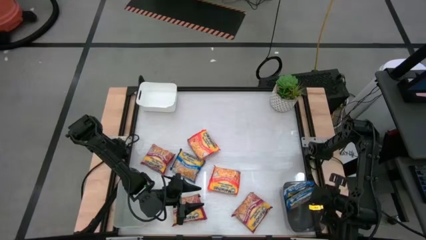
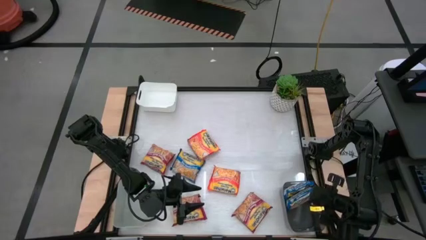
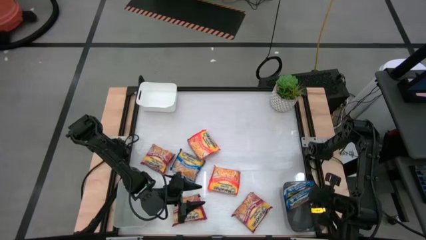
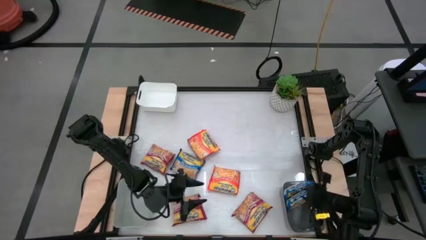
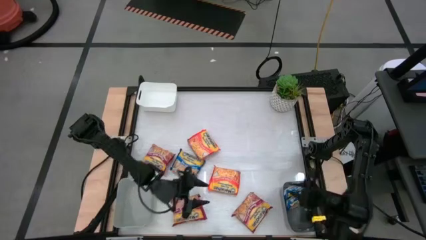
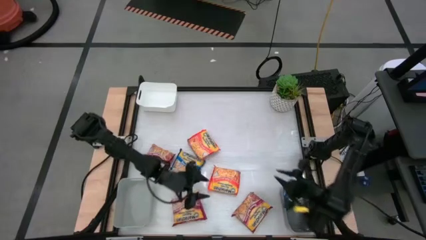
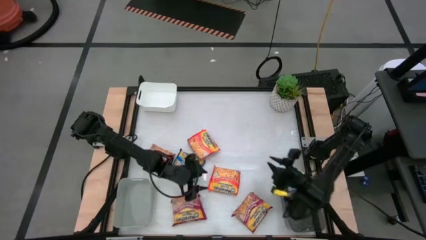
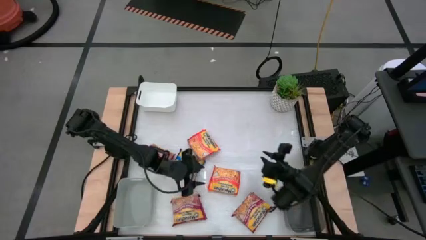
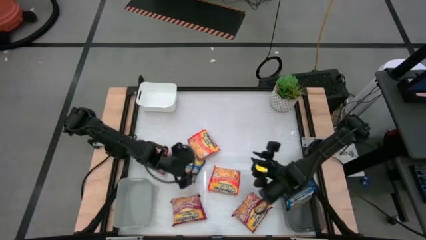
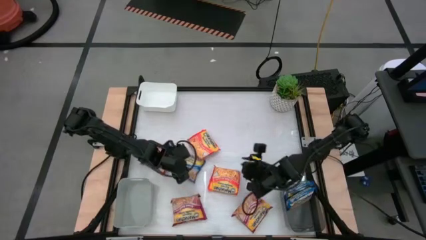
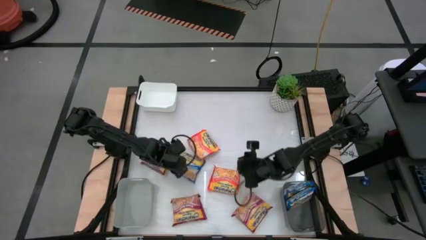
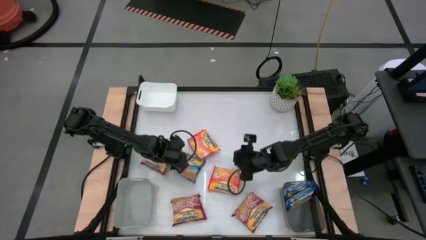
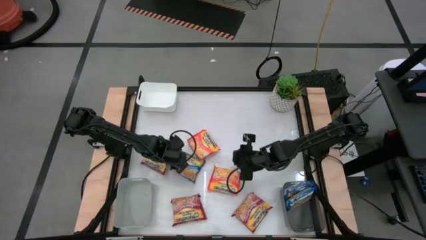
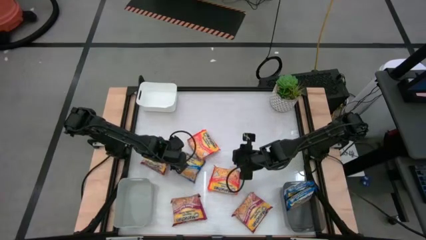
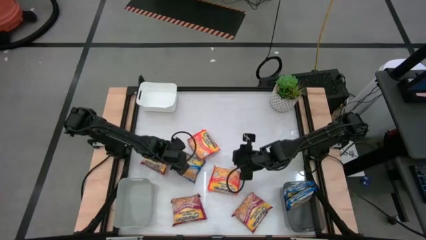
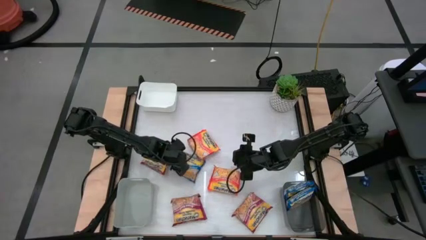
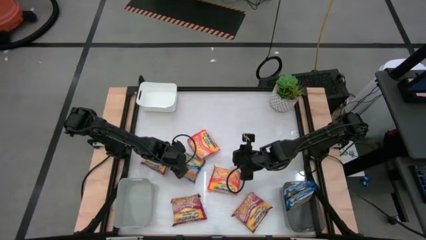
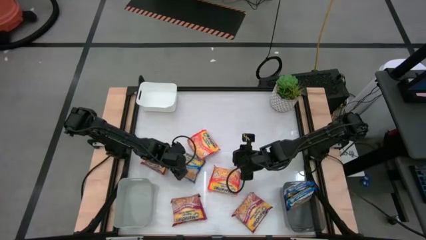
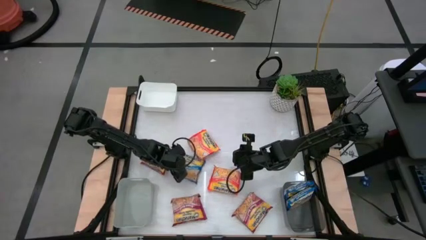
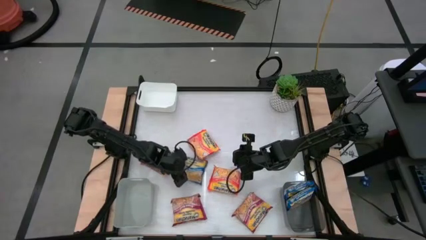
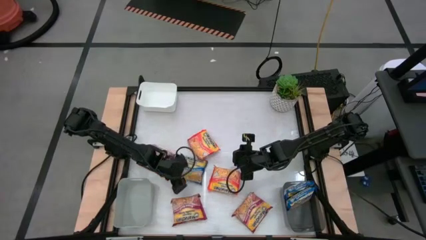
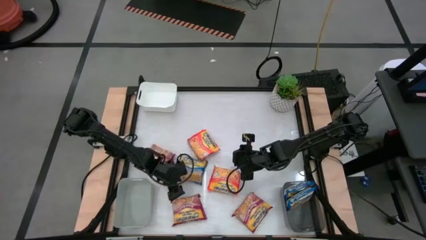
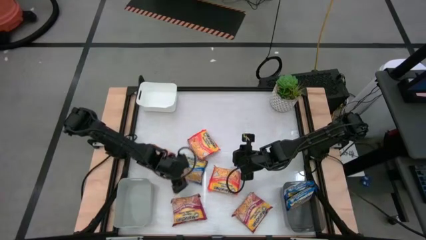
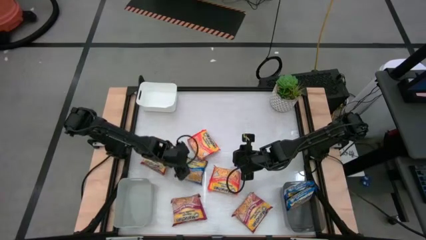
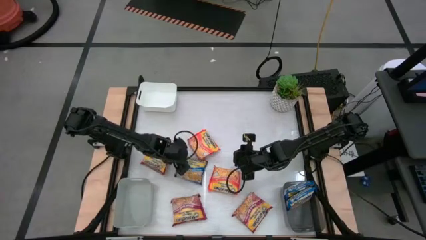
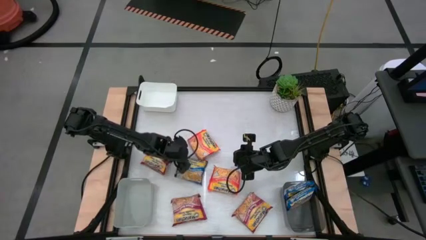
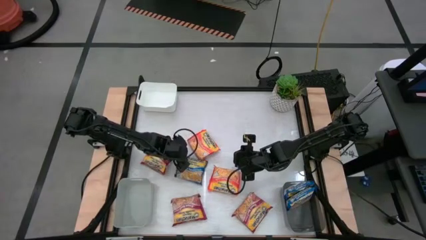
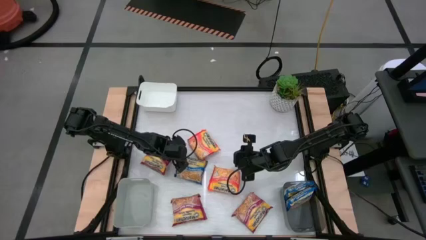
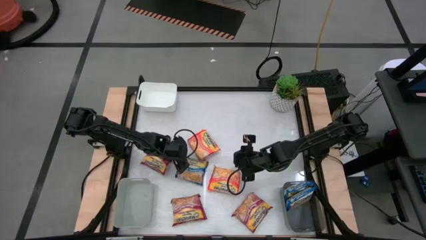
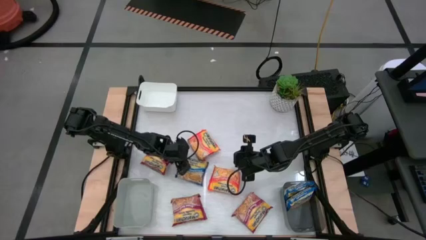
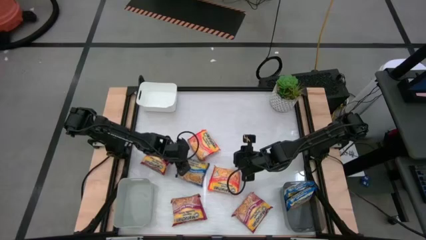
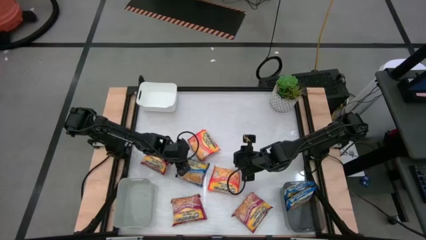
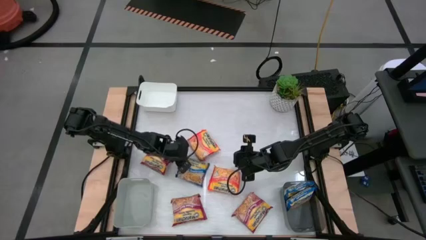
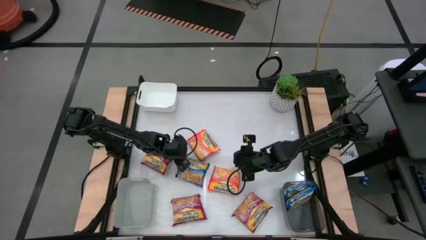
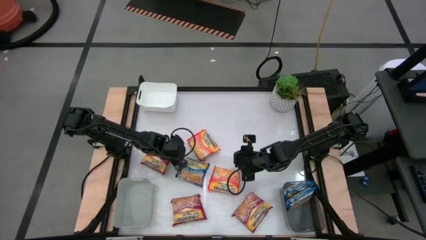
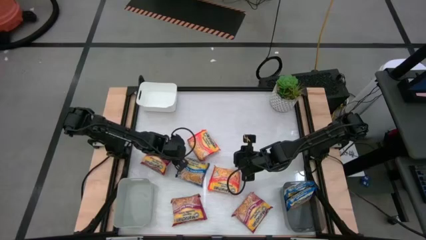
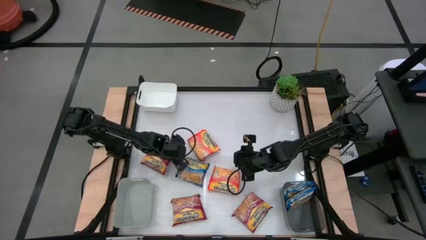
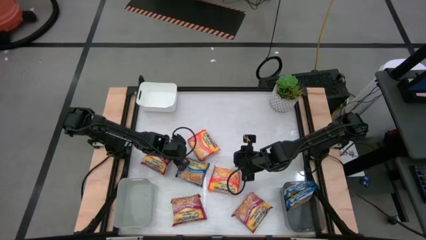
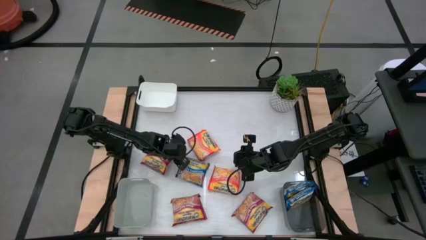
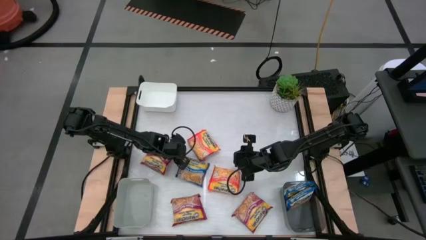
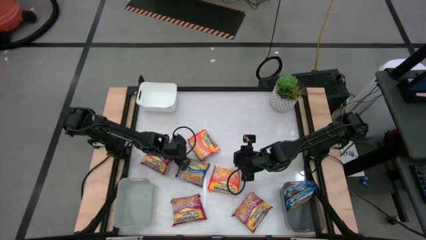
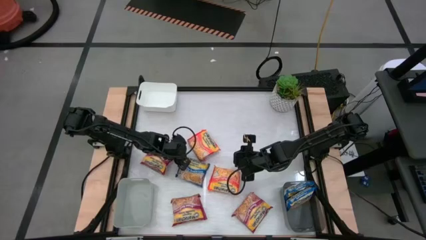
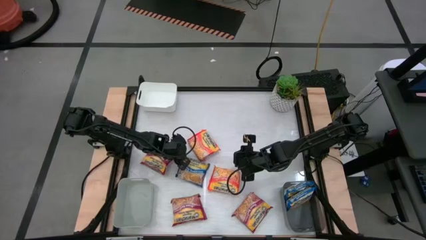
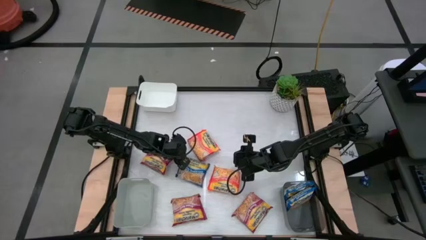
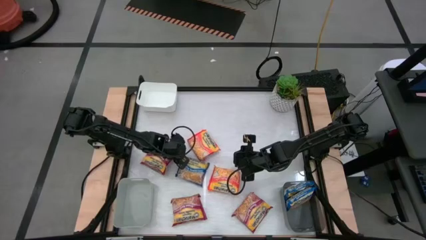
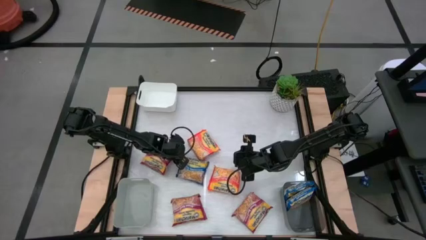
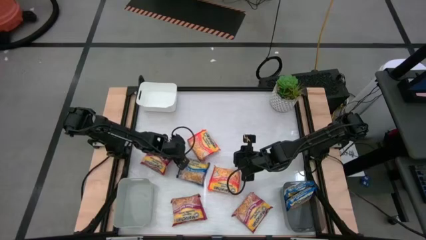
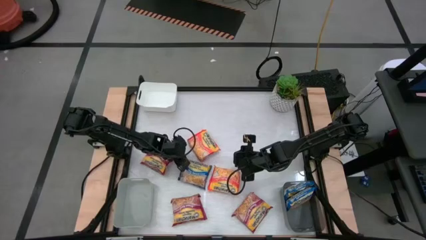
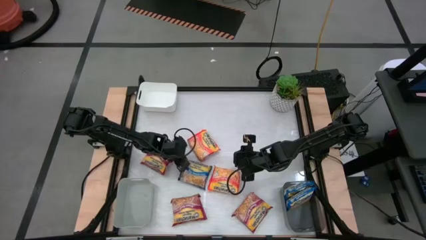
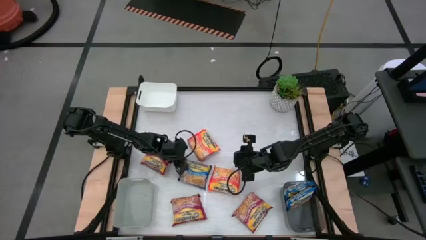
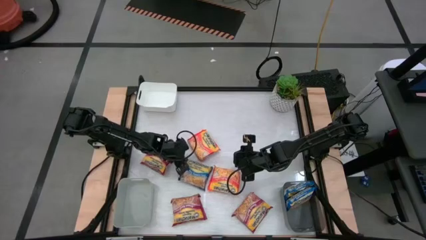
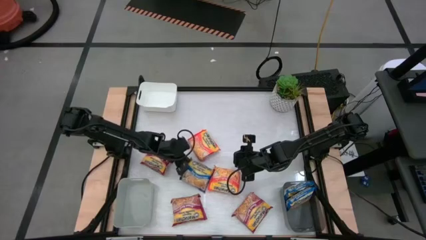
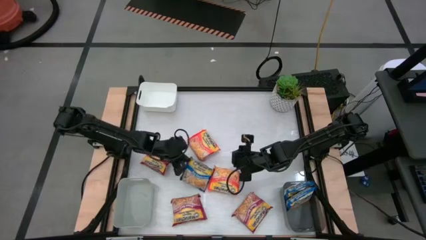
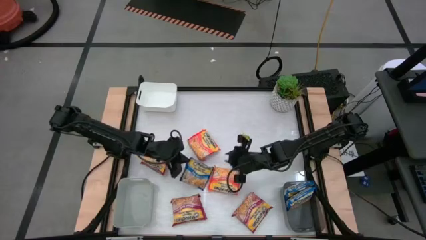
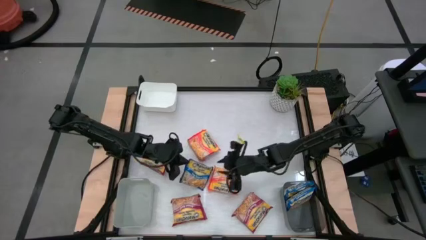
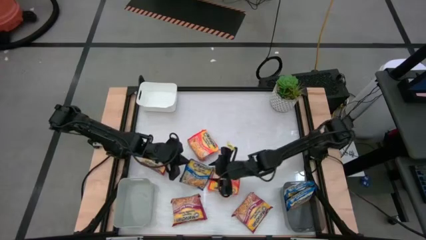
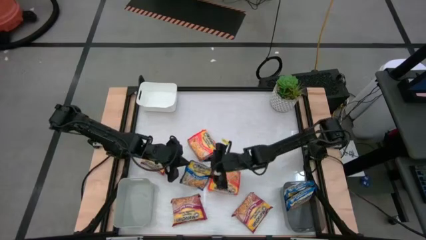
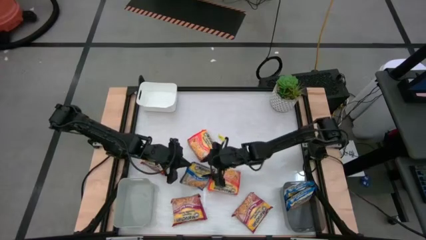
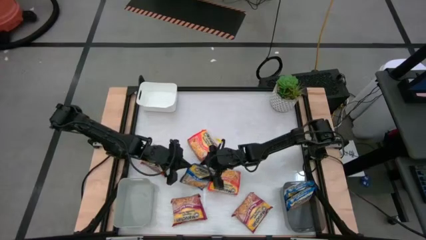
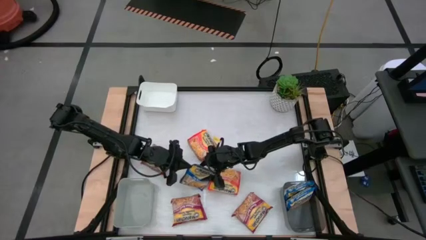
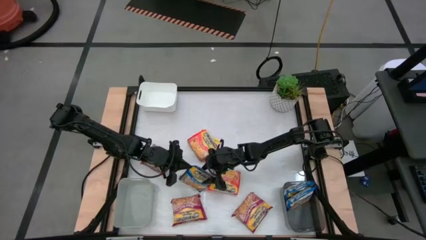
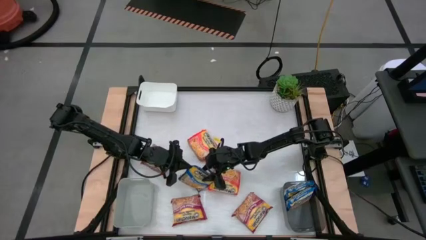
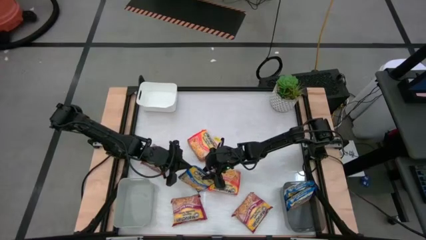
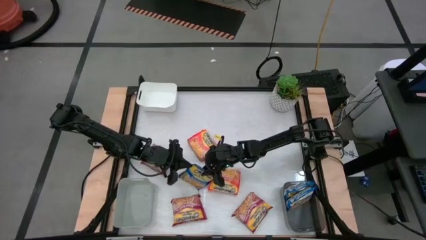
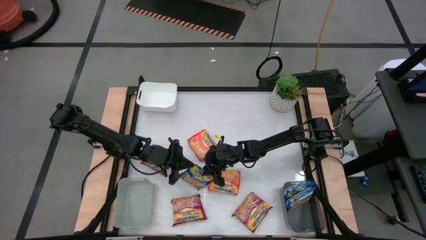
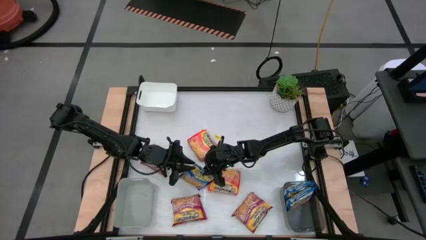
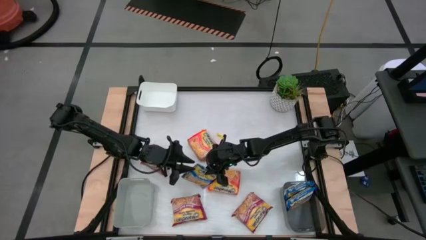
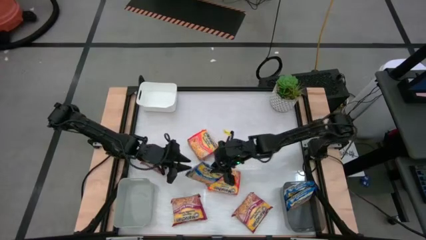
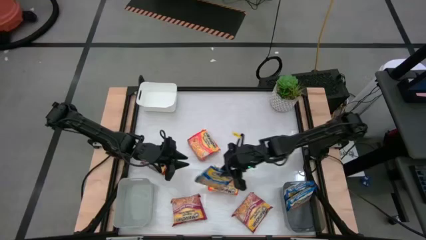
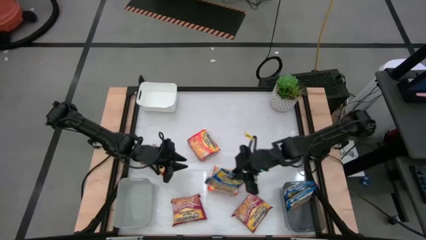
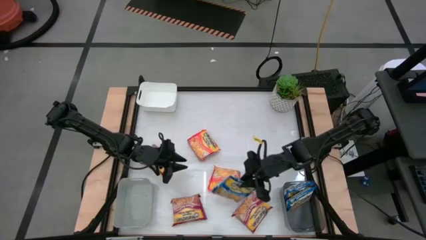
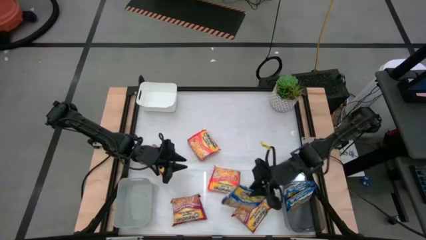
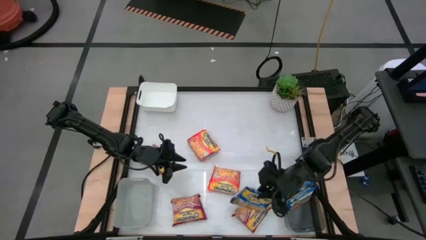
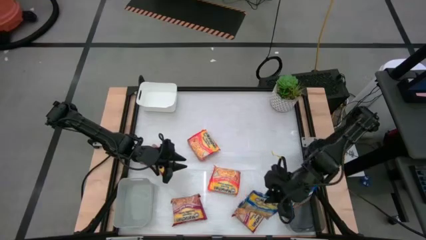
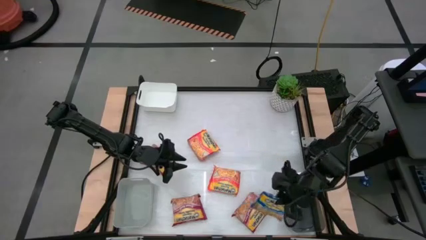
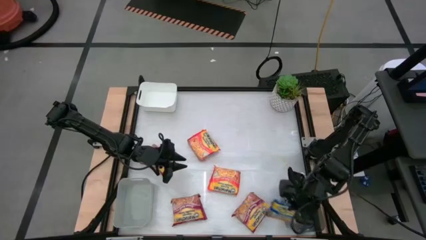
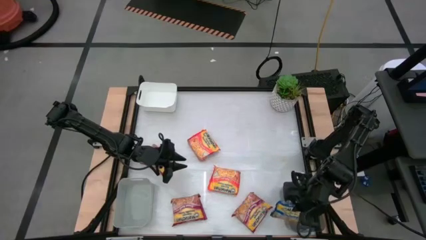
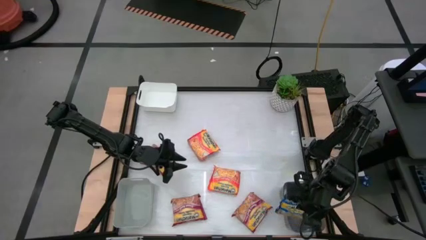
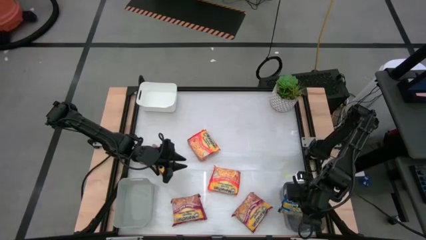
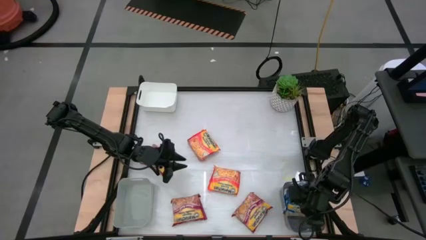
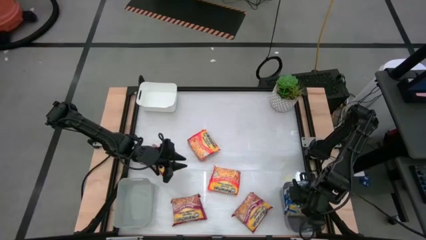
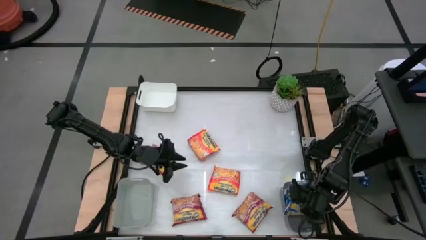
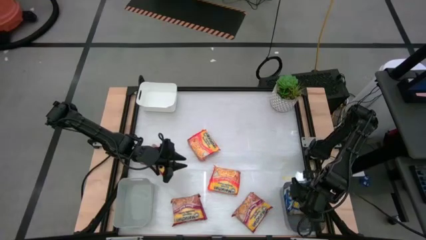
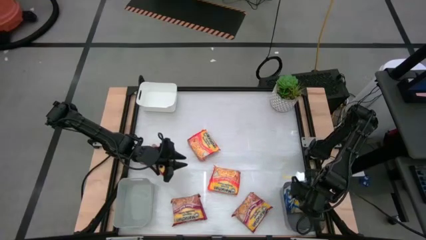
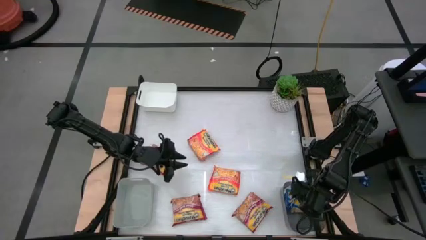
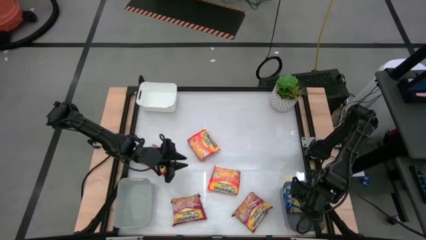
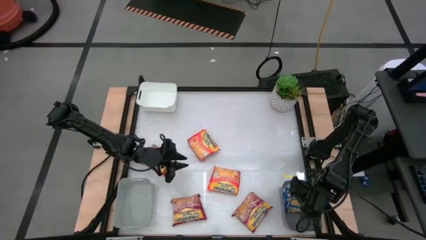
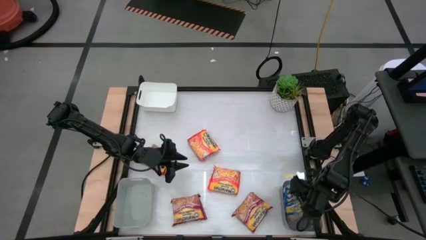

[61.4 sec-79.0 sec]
Task: Sort Maruchan noodles
Put the blue noodle pack into the black bin
